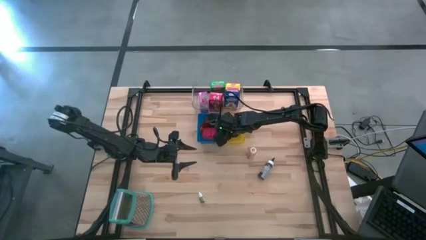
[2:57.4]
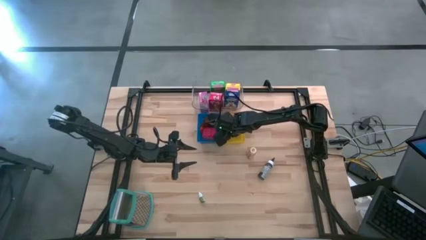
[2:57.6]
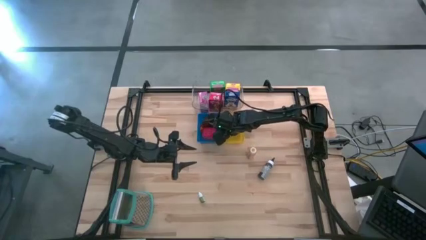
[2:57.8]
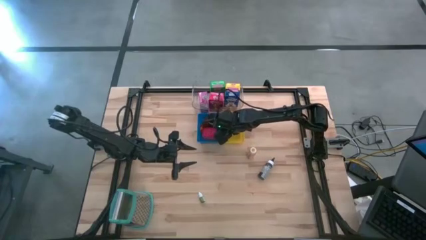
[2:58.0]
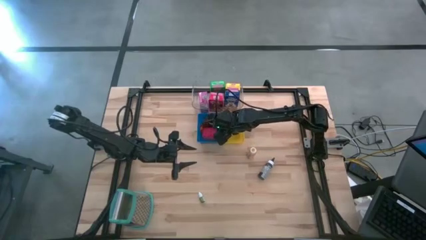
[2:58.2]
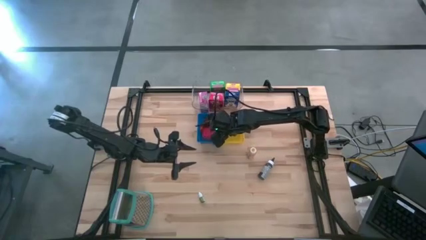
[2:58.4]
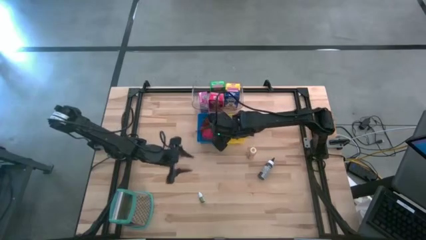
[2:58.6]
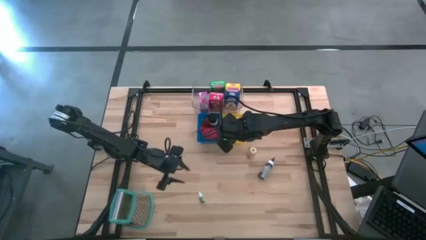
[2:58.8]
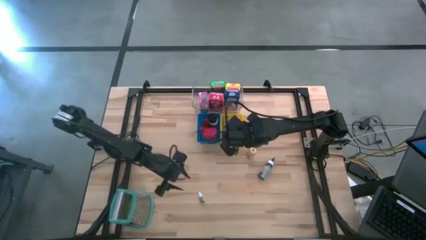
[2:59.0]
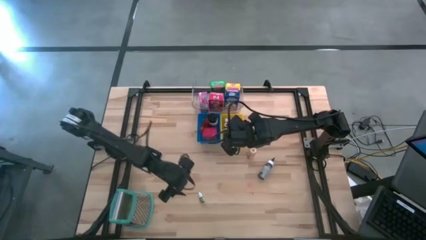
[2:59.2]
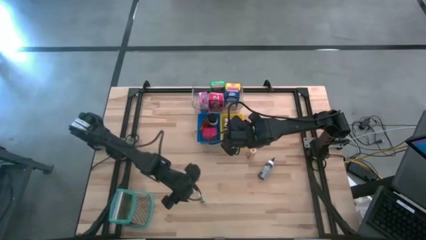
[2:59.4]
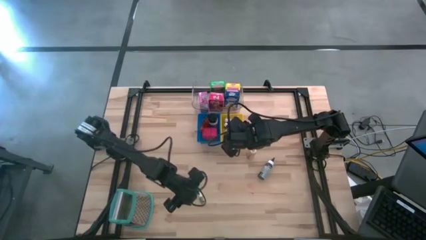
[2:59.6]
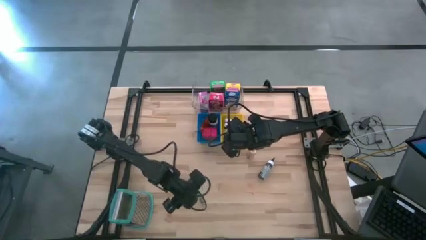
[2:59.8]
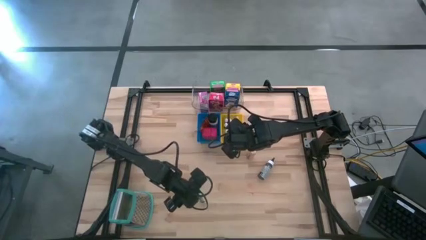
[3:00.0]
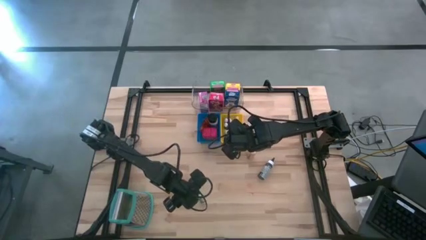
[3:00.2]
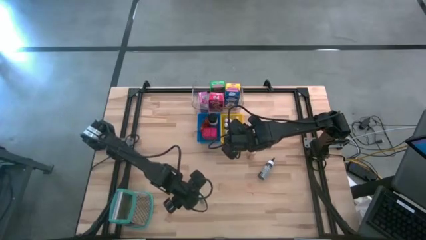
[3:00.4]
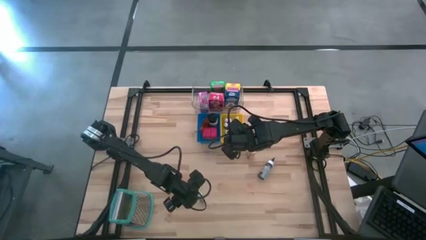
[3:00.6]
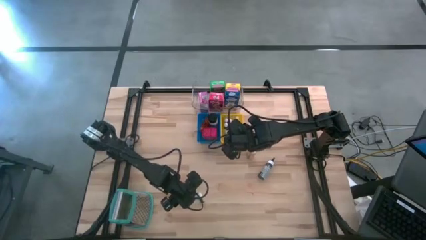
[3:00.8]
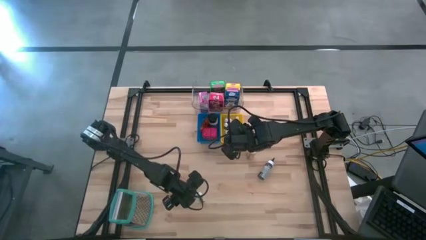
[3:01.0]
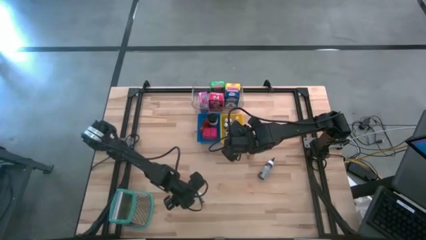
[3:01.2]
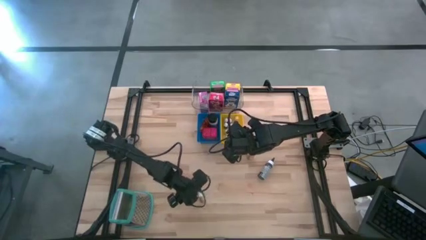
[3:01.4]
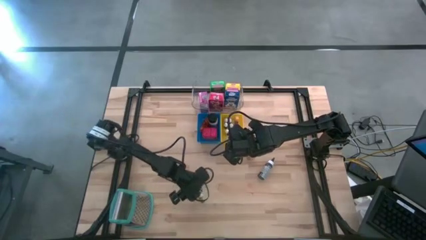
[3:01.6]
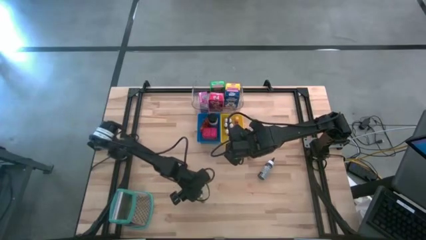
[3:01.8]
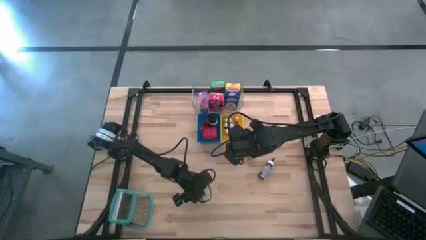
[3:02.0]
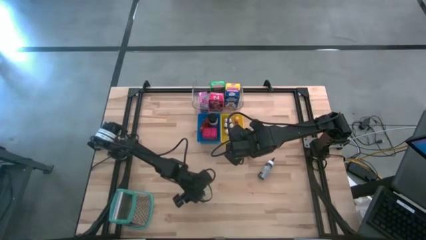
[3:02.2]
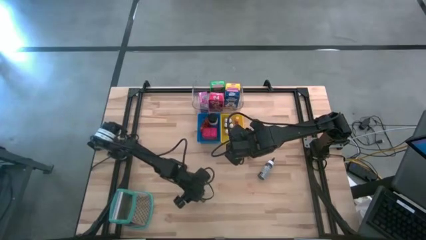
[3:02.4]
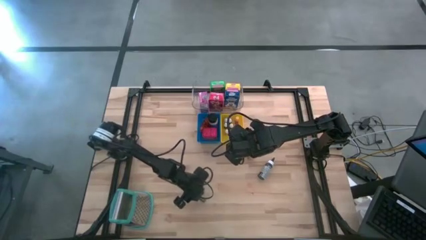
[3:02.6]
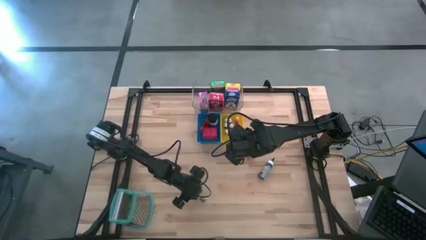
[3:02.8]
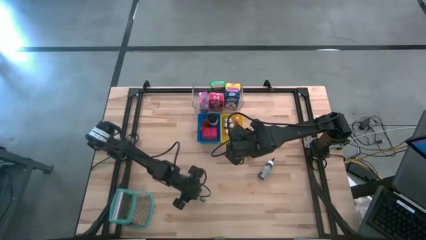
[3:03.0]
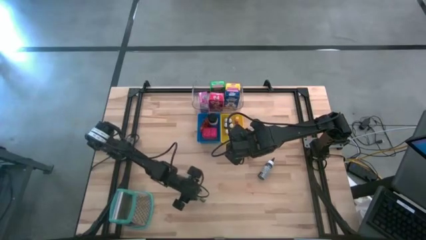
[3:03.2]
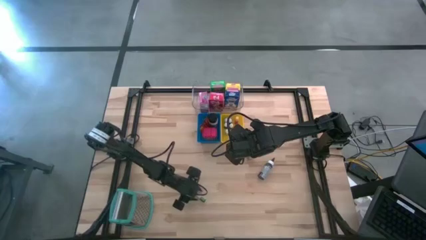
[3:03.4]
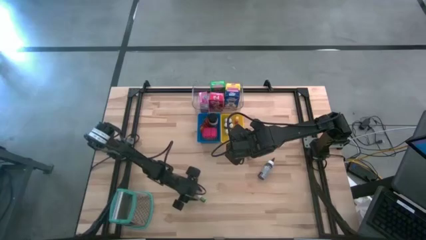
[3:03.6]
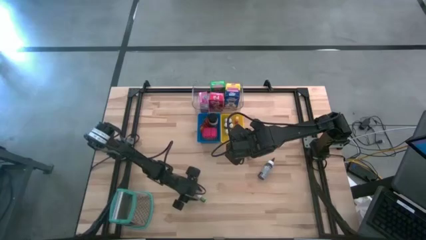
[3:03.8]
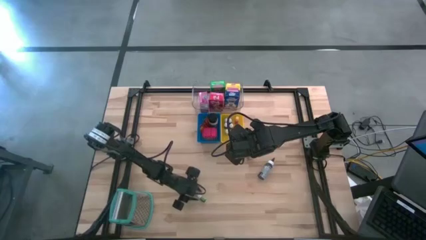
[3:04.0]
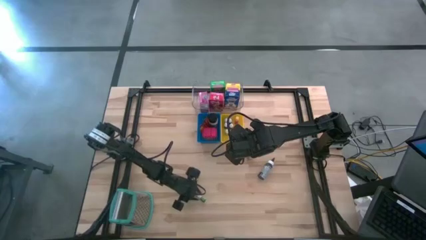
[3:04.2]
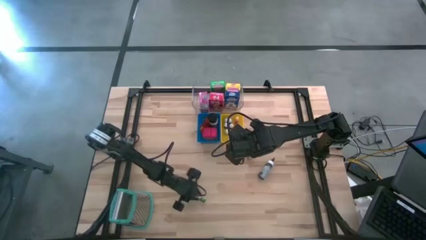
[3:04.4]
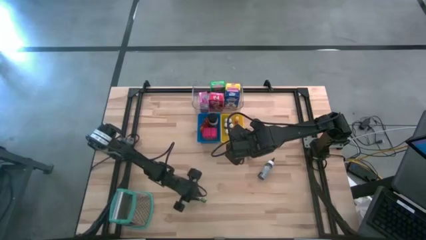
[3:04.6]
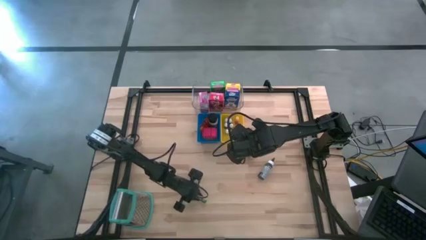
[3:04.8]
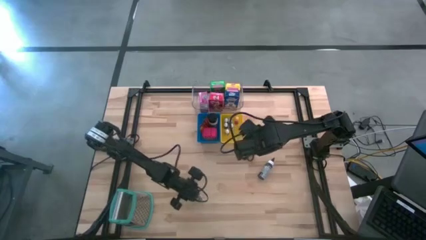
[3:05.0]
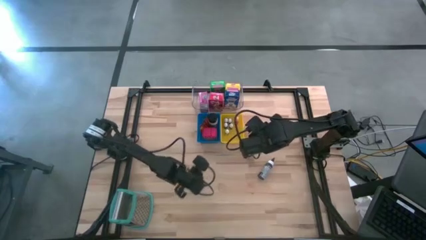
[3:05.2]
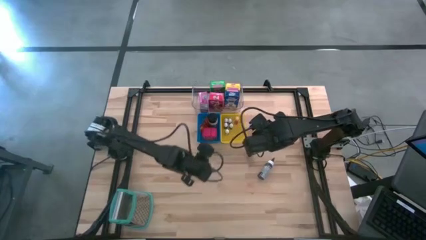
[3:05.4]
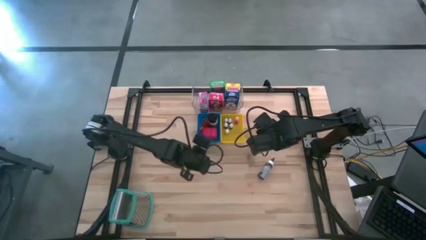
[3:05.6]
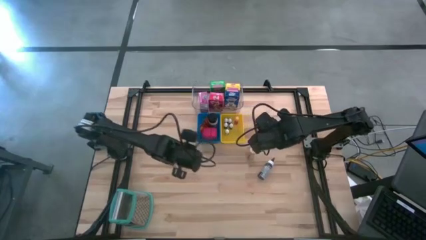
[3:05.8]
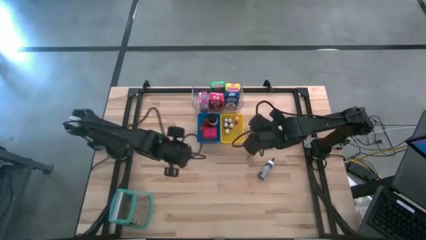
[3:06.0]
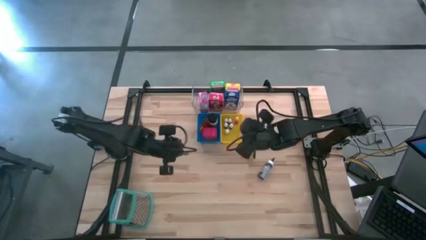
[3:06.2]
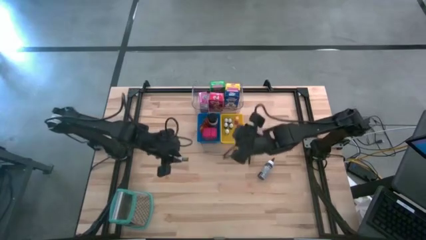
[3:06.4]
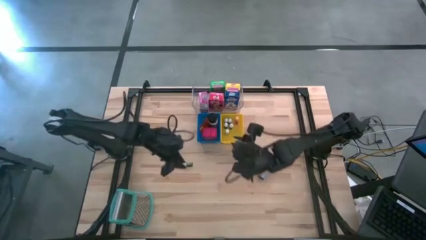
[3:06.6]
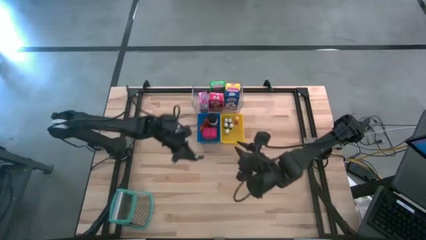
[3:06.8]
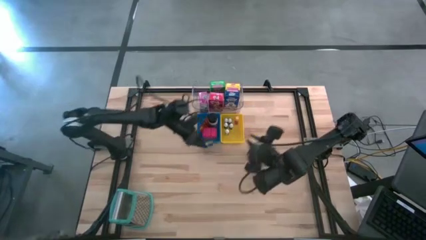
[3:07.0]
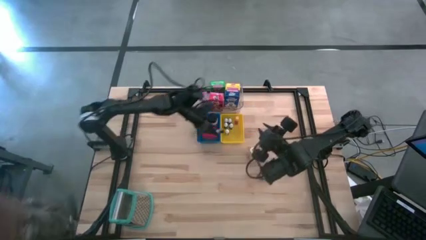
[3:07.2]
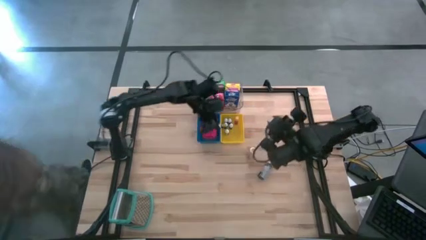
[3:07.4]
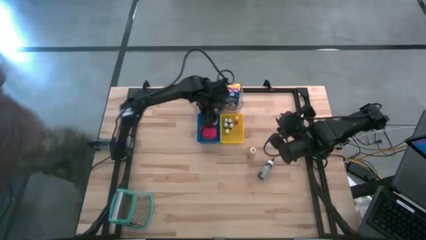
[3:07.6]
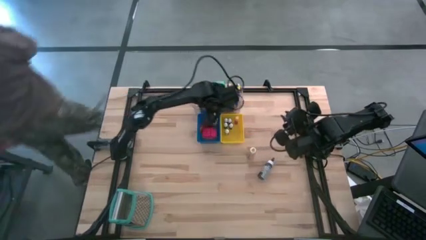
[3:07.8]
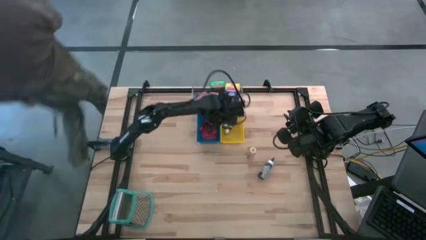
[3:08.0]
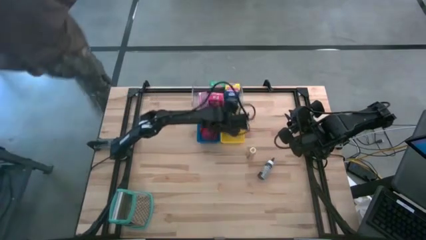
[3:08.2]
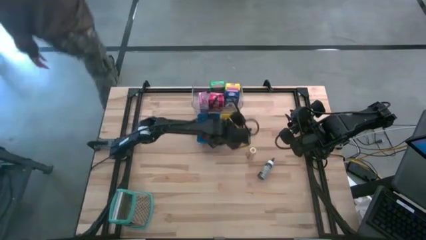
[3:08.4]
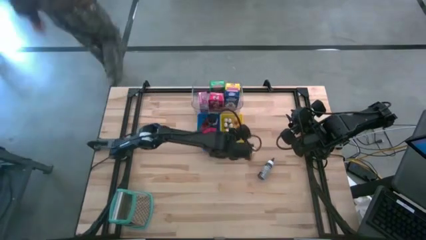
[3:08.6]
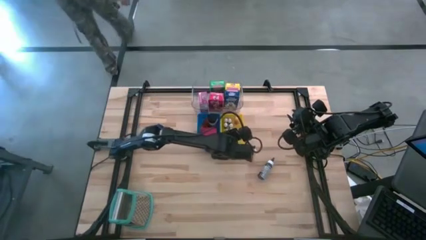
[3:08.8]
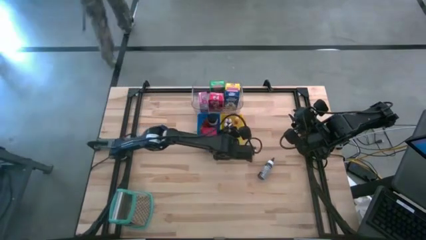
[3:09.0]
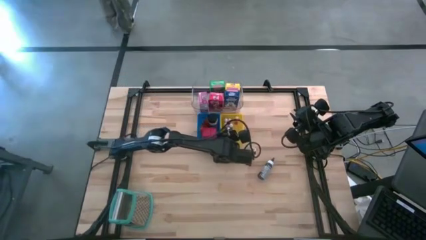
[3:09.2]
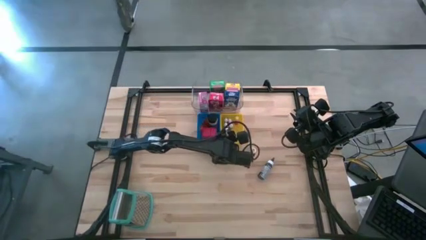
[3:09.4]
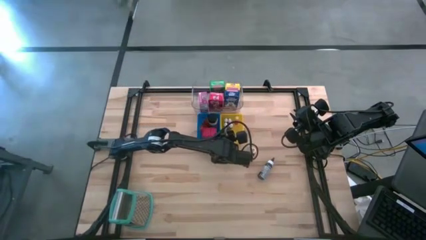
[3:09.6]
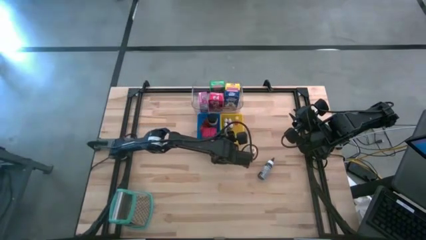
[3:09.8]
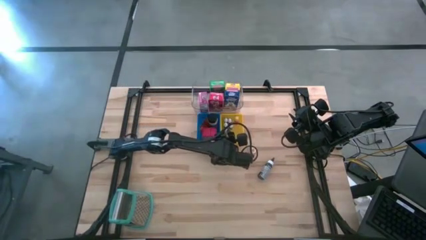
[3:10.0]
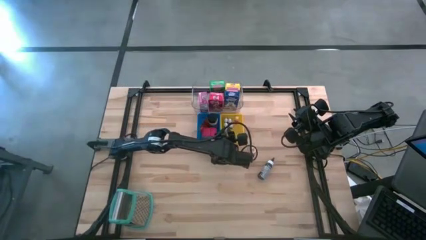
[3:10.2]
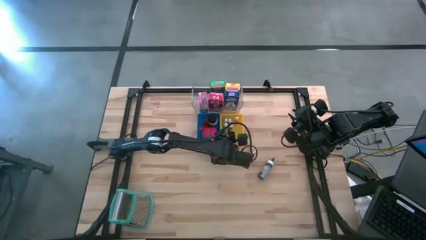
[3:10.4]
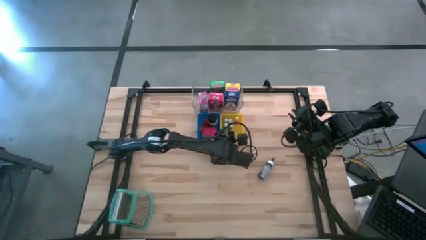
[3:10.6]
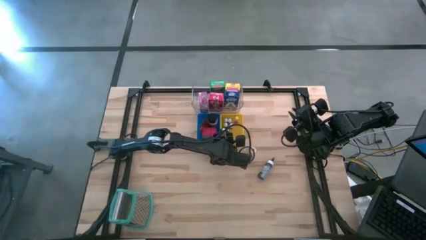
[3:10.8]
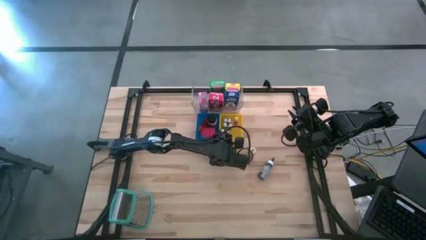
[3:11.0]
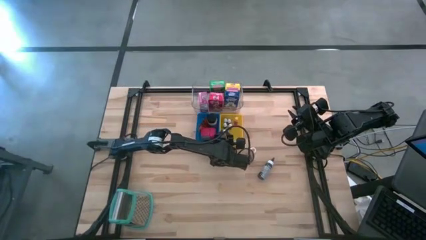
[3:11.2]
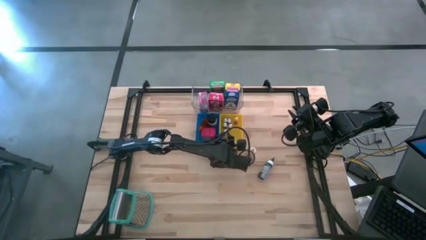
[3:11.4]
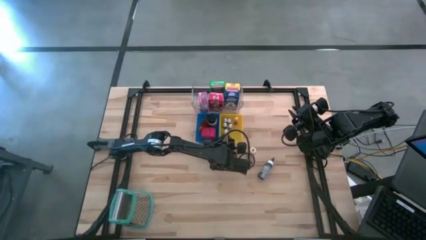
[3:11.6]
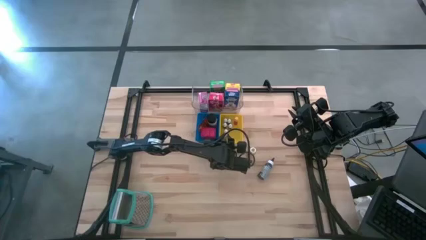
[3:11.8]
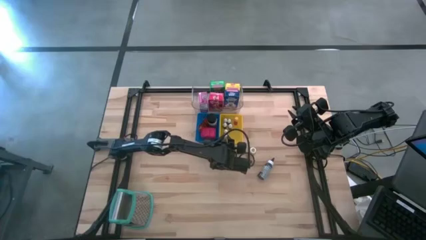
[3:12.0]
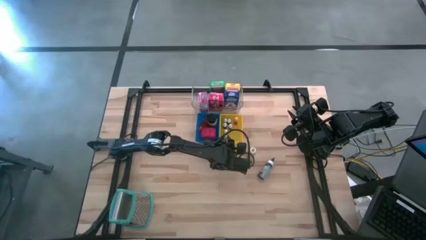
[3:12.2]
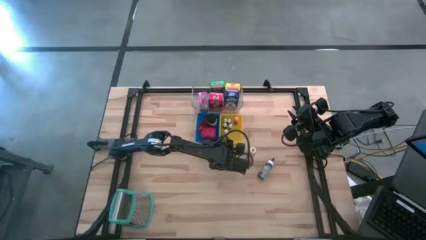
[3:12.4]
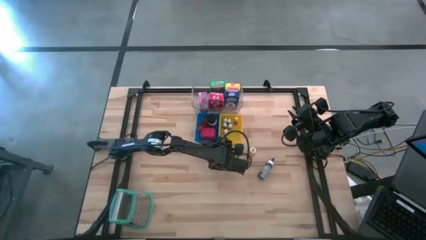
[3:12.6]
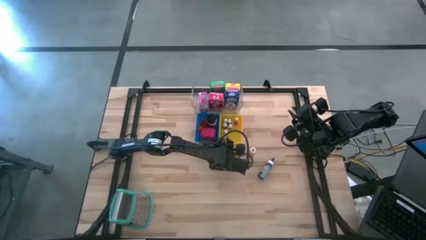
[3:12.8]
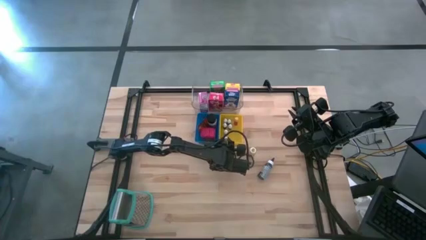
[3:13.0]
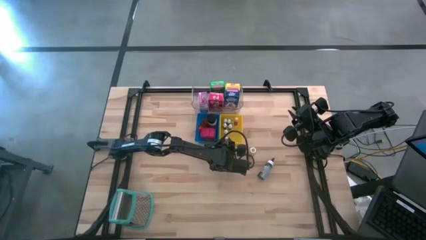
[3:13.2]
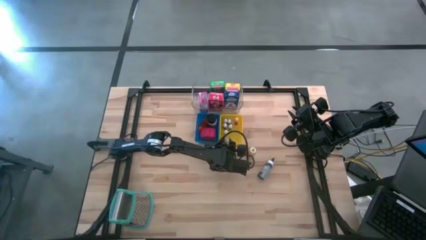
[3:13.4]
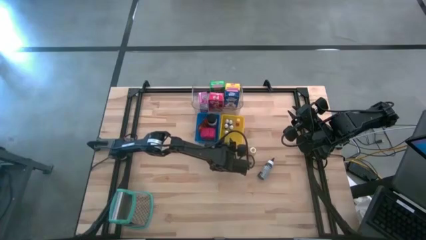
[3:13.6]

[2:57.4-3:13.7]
Task: Pick & Place Kitchen Items
Put the small green food coloring bottle into the yellow bin
